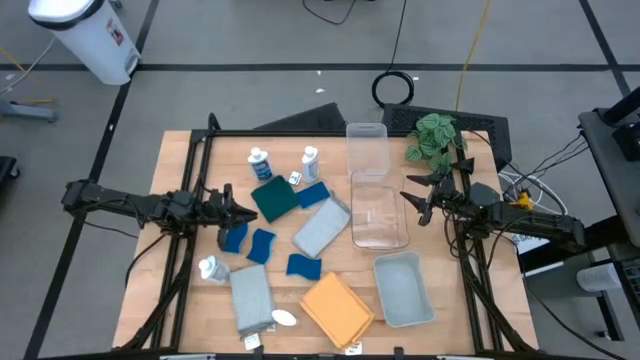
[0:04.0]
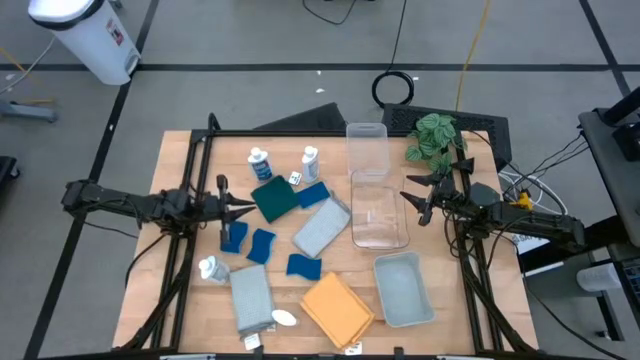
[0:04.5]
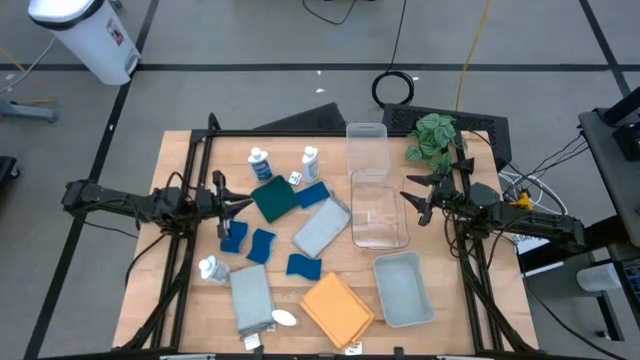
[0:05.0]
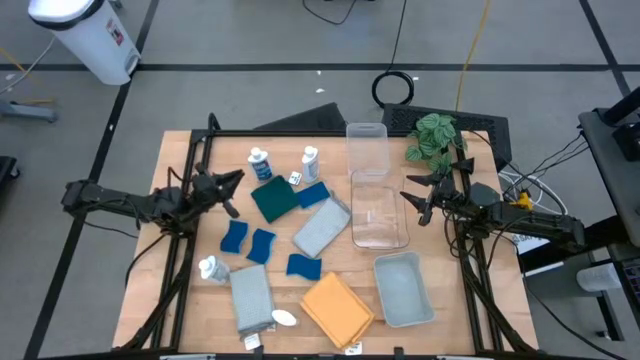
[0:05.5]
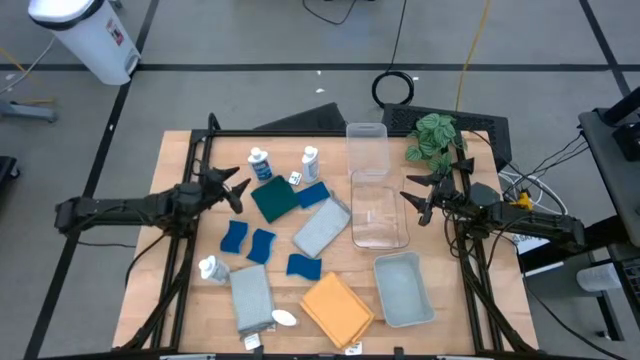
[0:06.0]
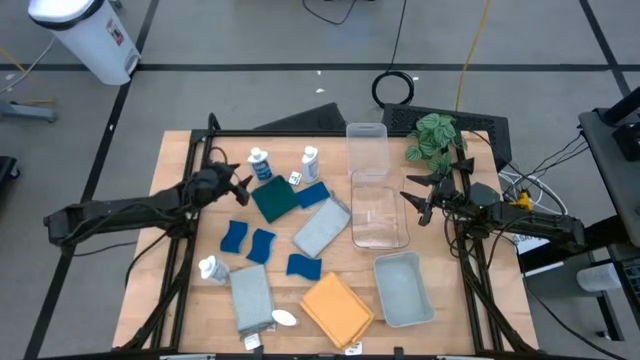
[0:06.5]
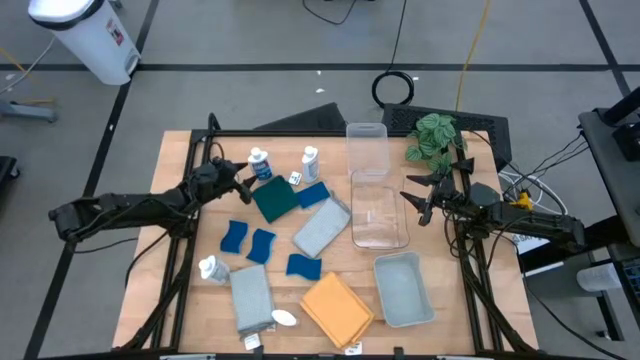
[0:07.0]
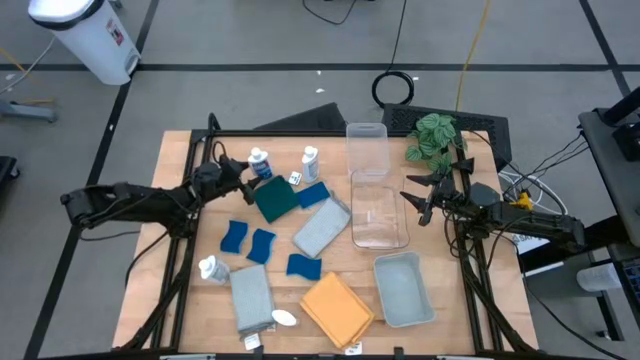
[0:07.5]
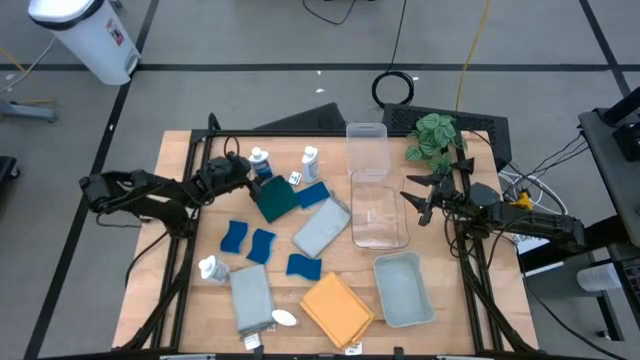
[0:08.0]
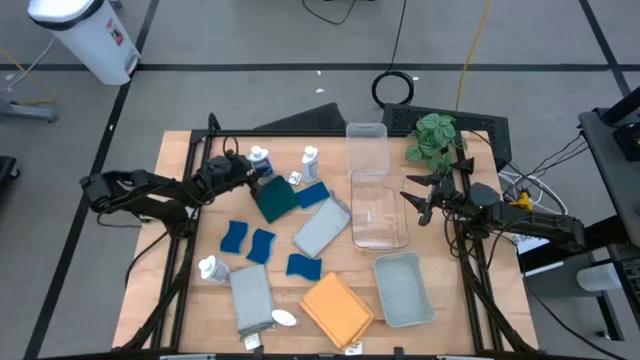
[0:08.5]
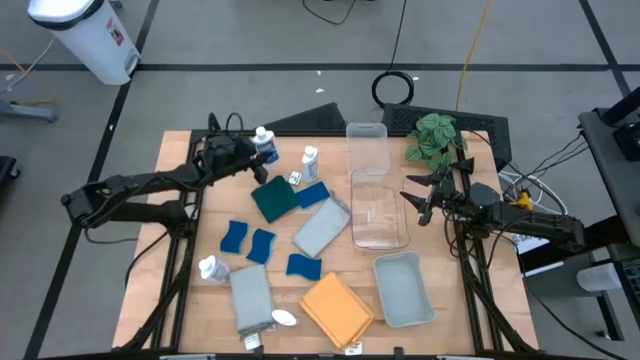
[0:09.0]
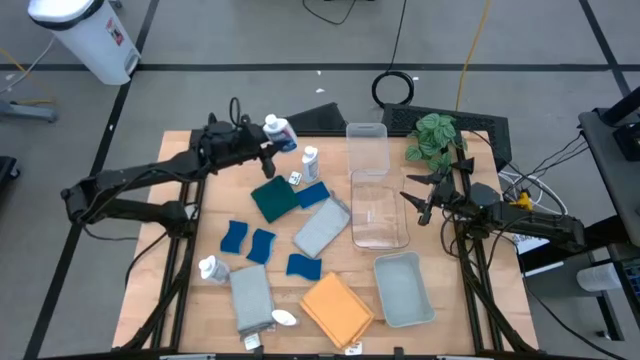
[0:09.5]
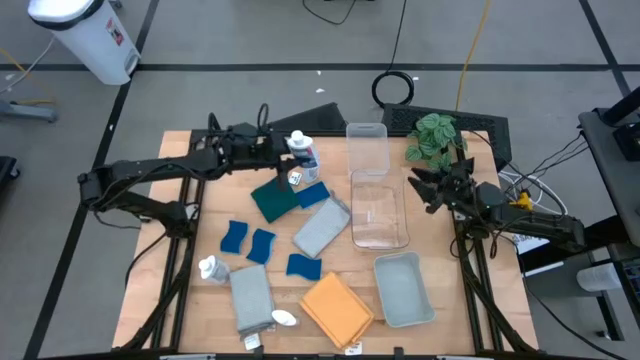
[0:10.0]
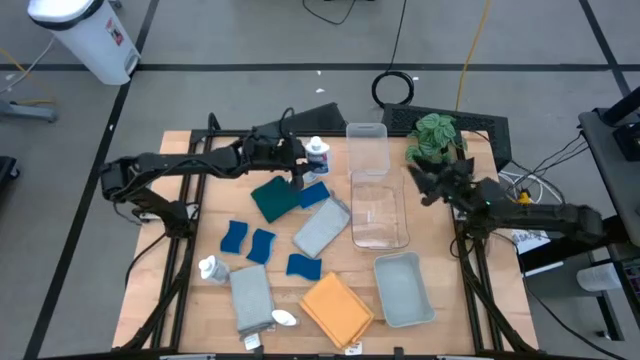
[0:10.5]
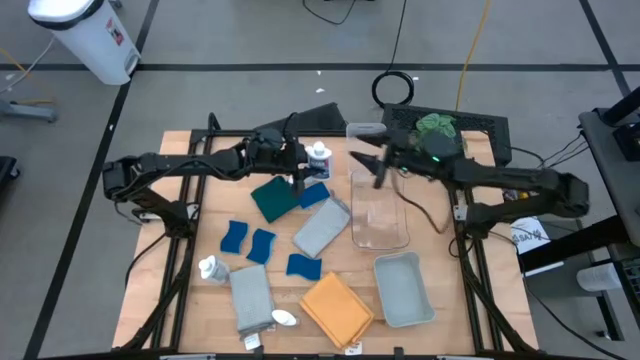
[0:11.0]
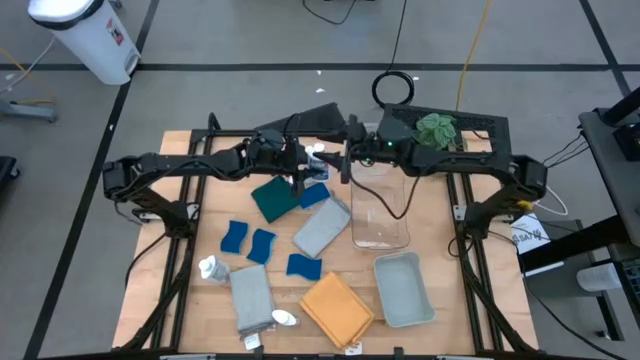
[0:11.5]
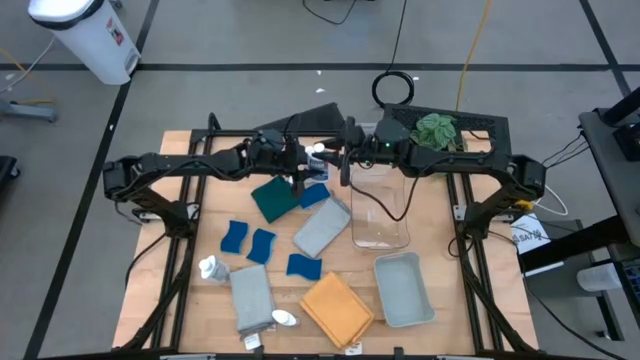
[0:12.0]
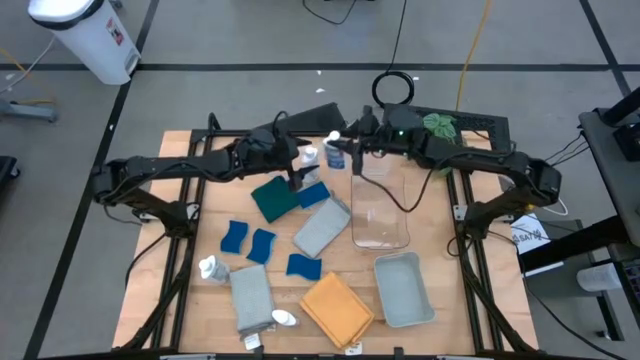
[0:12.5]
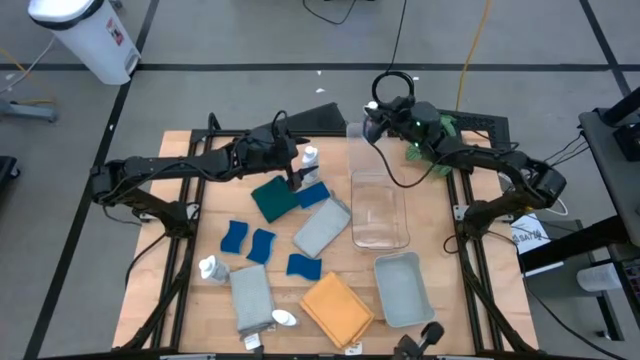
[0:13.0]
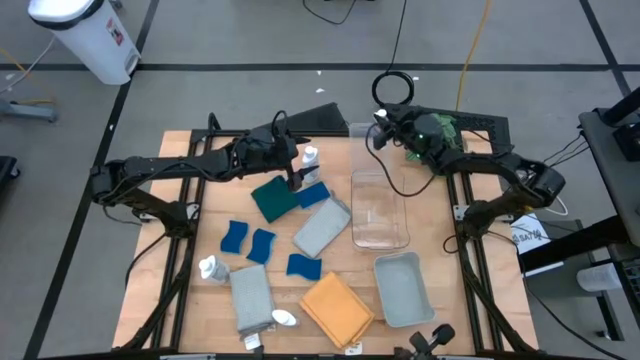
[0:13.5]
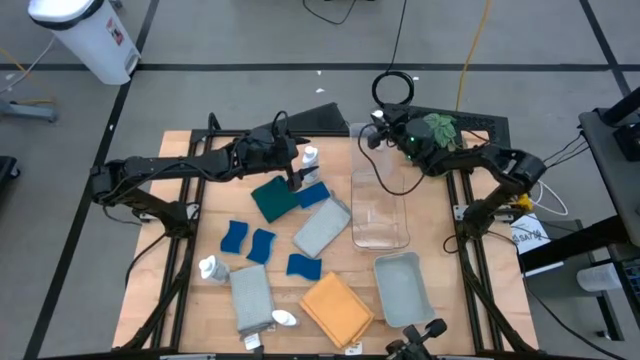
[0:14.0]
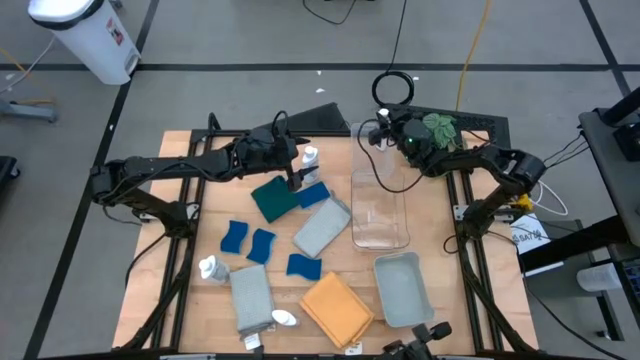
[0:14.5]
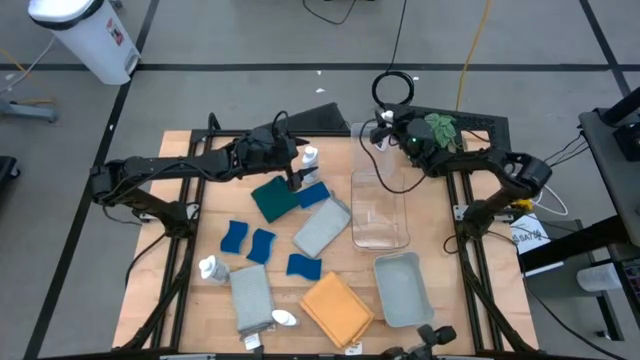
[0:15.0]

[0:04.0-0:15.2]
Task: Pick & Place Kitchen Items
Put the white plastic restorer bottle into the top transparent bin

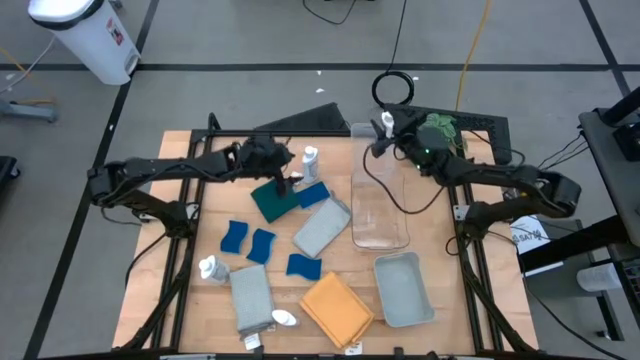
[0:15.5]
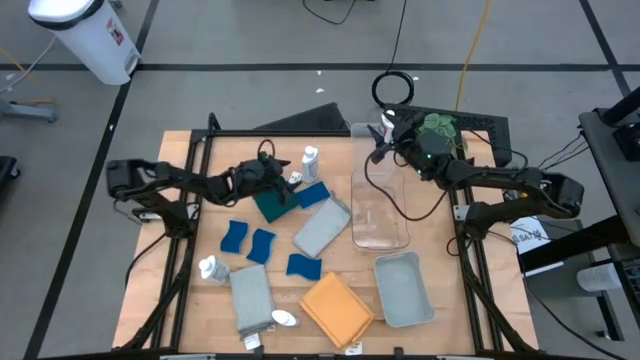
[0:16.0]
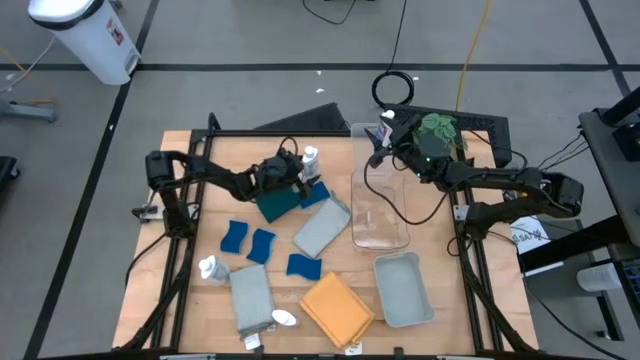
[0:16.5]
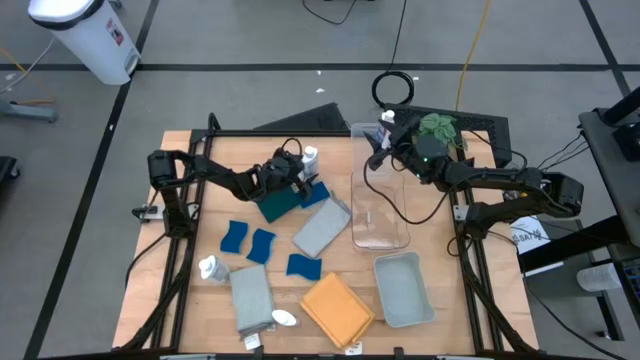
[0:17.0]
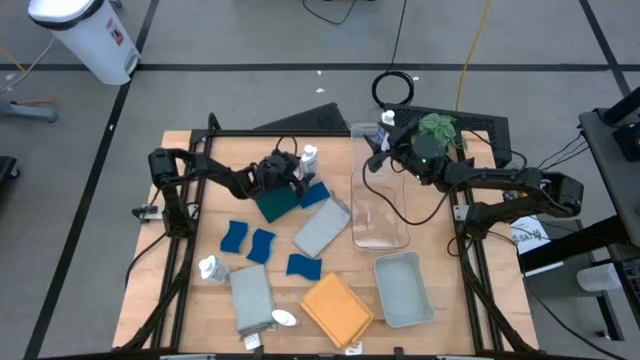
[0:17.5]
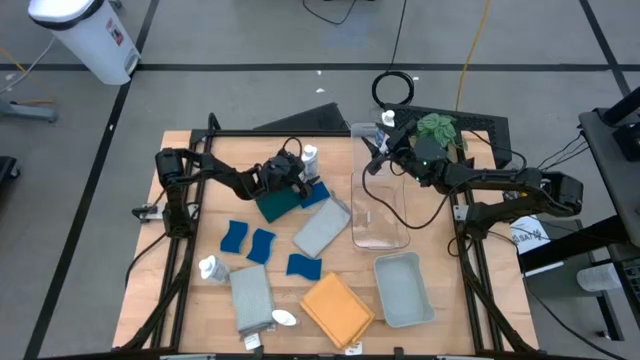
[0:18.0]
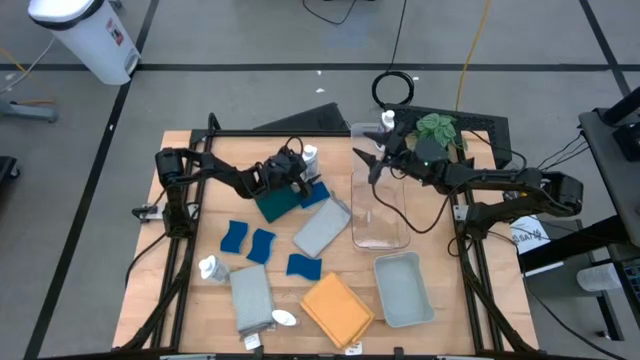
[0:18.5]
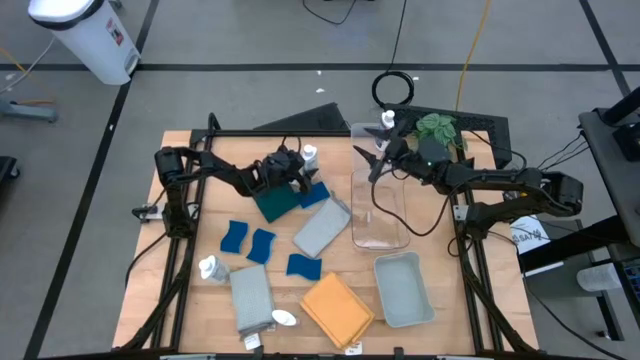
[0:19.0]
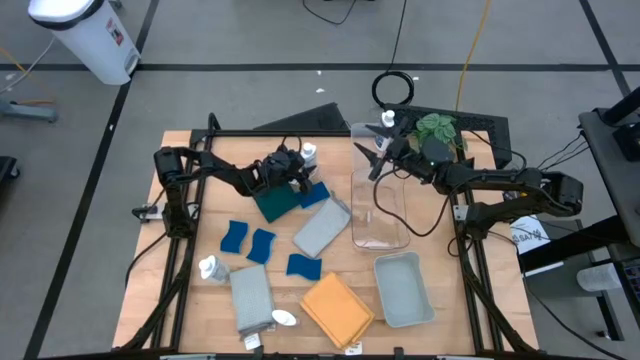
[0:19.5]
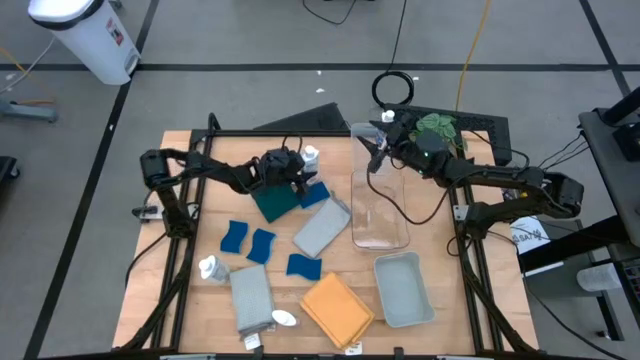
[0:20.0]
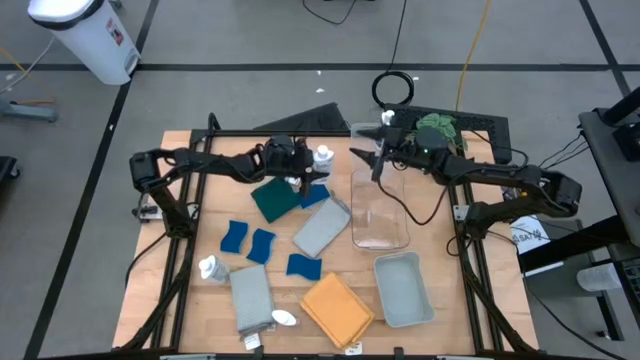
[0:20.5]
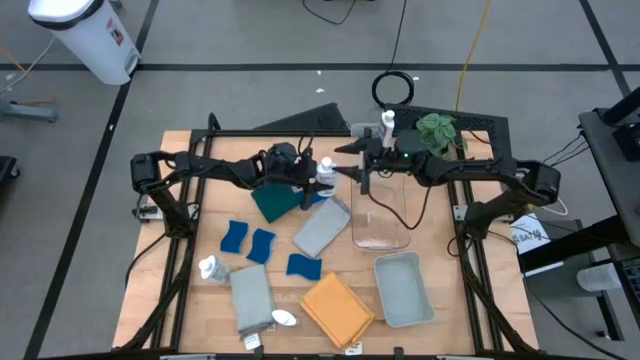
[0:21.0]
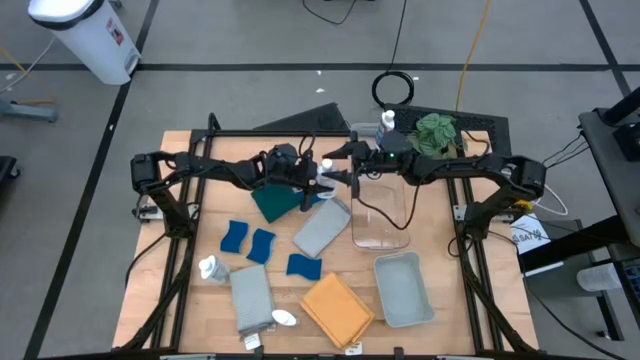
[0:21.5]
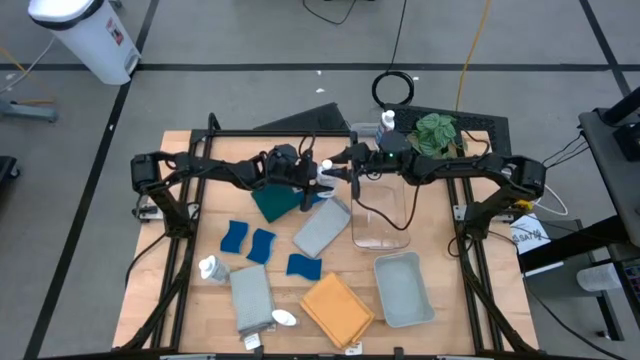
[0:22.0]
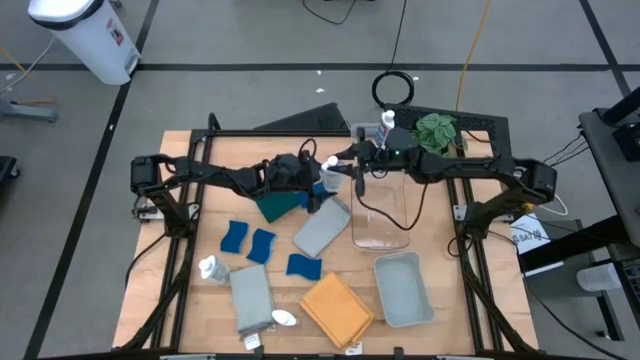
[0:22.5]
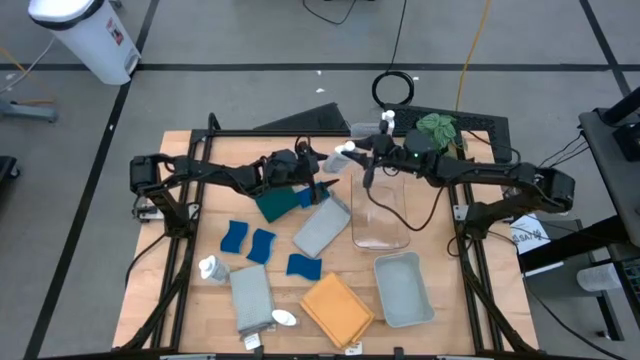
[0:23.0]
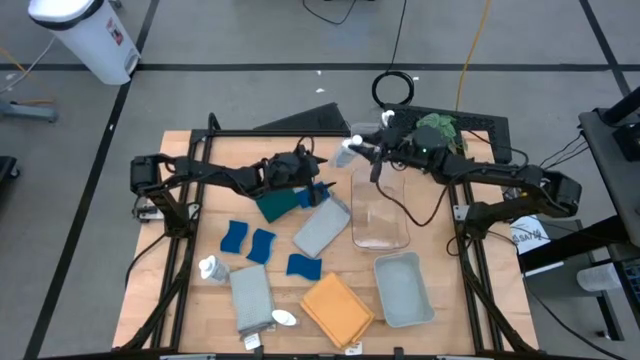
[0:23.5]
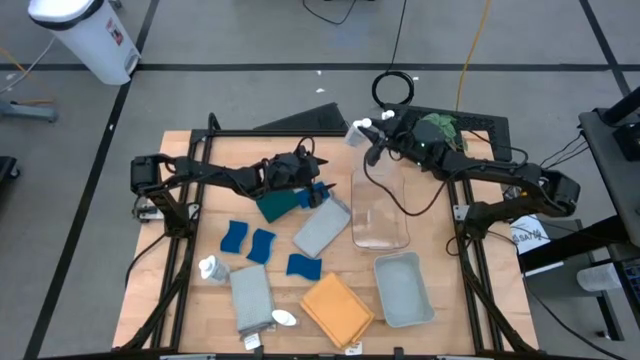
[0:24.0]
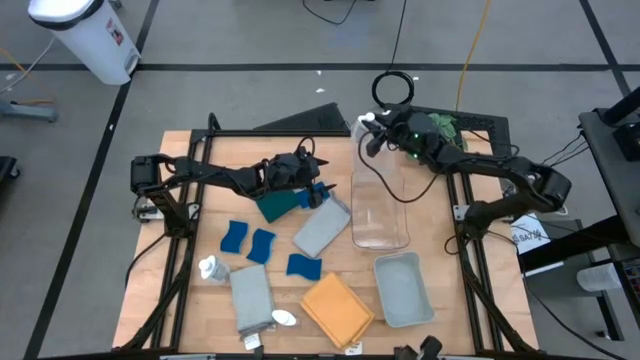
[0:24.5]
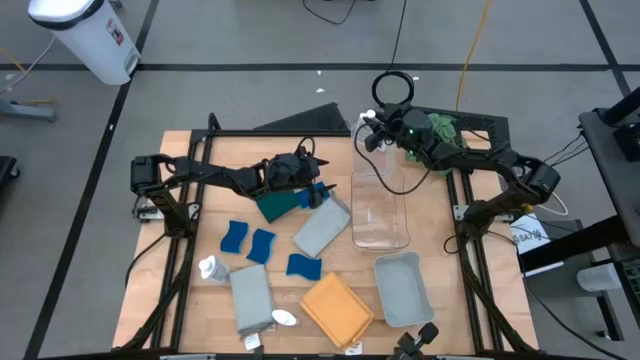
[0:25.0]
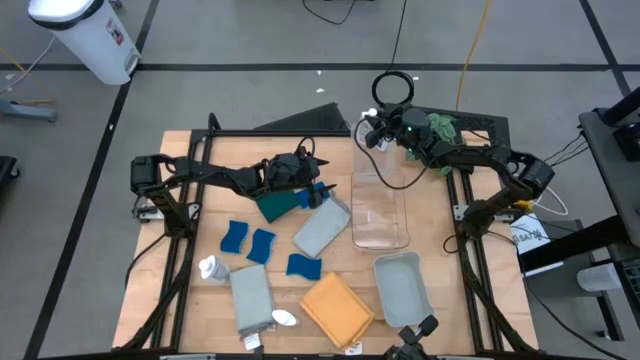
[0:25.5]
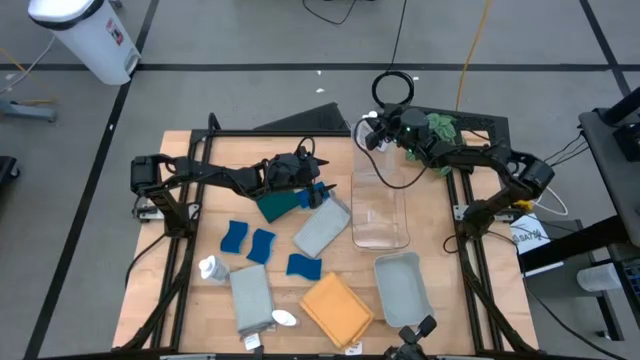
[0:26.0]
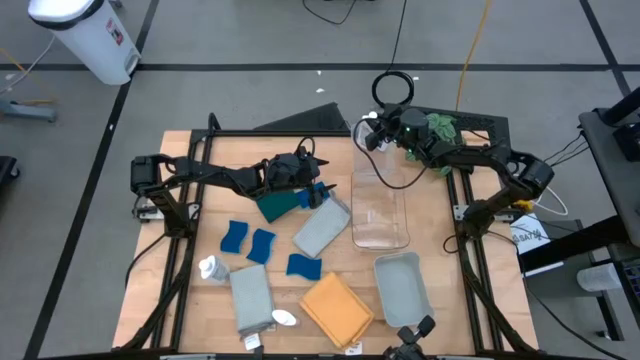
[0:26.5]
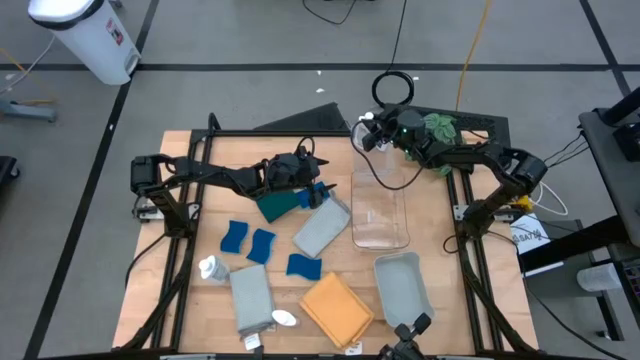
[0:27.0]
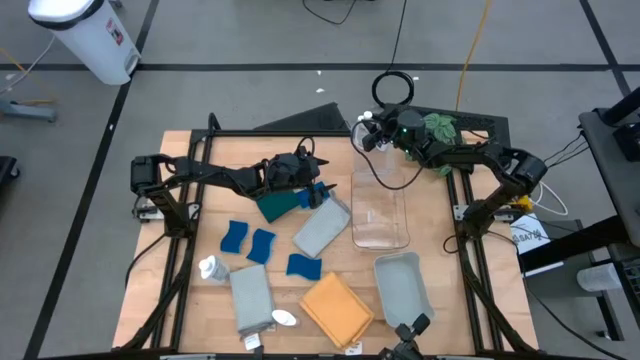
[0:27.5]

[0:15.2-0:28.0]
Put the white plastic restorer bottle into the top transparent bin
